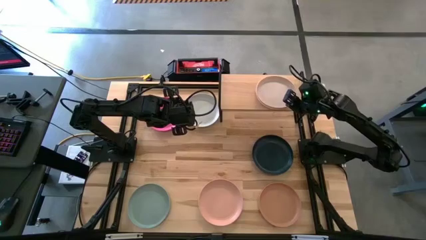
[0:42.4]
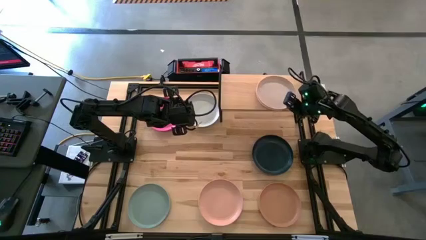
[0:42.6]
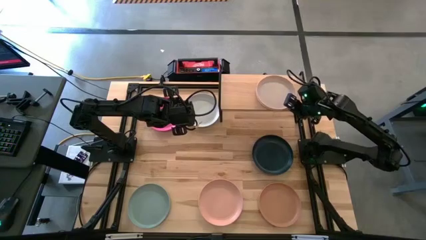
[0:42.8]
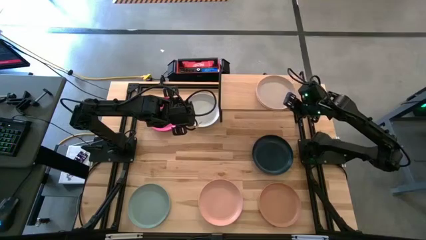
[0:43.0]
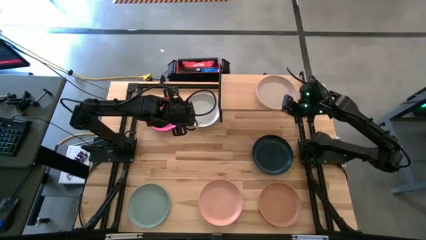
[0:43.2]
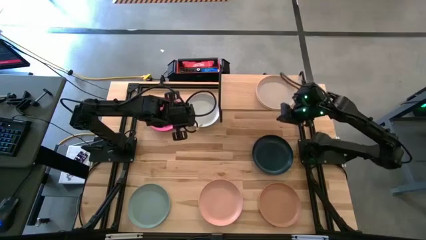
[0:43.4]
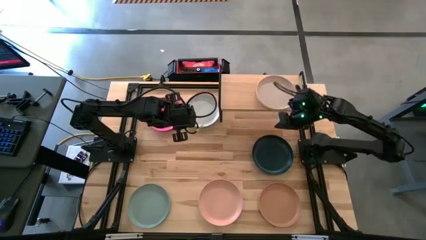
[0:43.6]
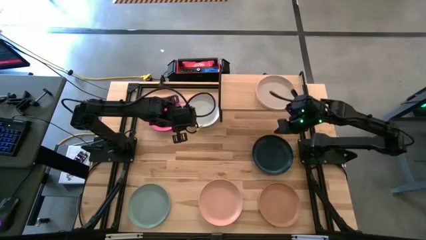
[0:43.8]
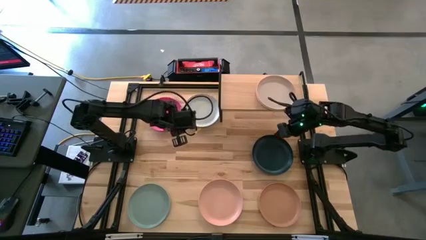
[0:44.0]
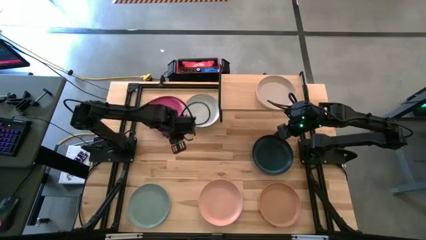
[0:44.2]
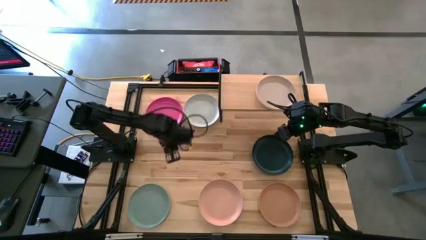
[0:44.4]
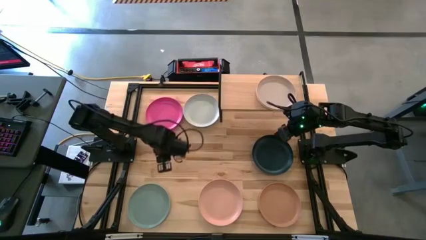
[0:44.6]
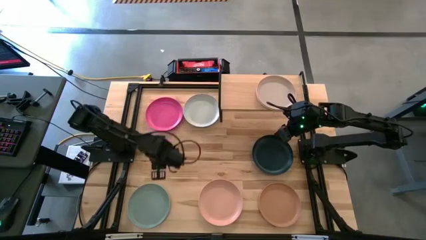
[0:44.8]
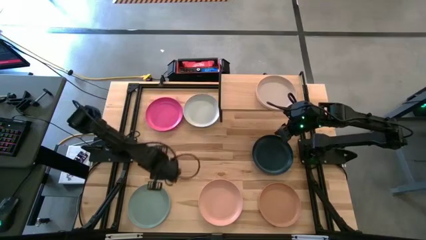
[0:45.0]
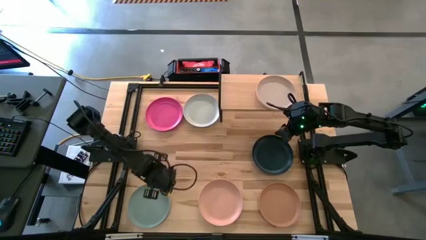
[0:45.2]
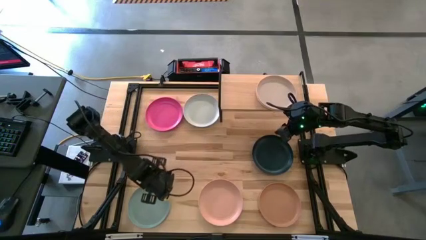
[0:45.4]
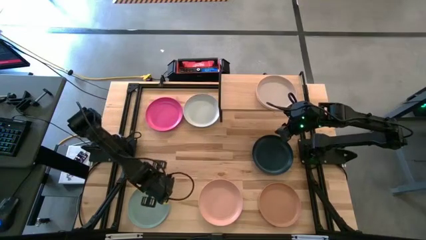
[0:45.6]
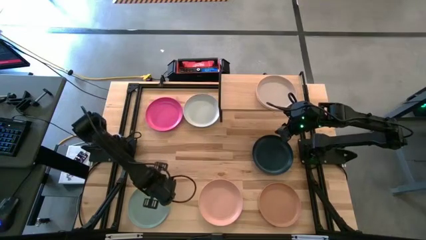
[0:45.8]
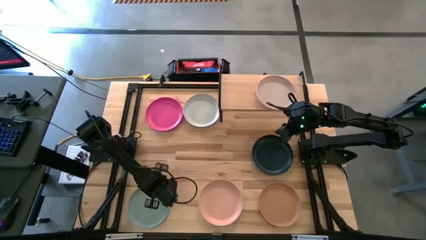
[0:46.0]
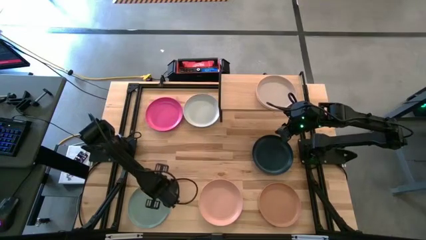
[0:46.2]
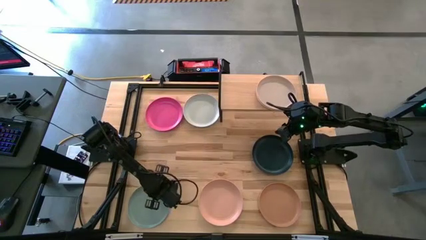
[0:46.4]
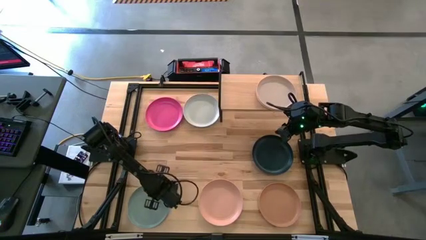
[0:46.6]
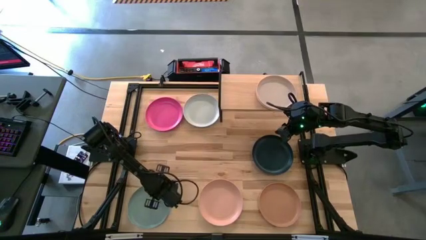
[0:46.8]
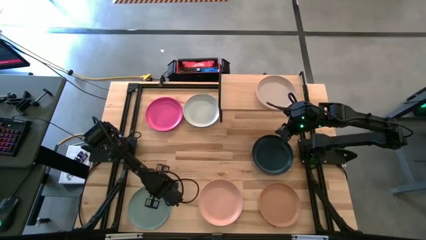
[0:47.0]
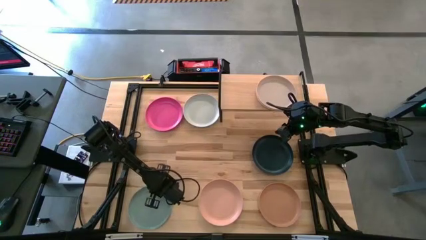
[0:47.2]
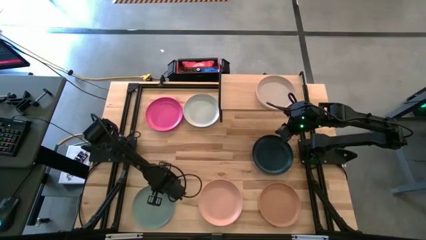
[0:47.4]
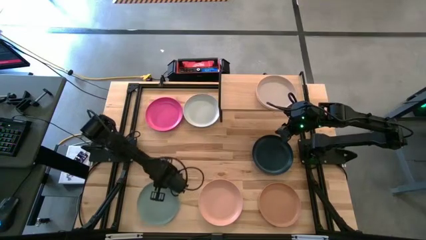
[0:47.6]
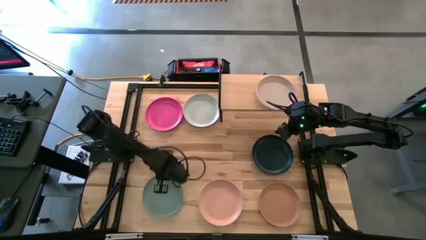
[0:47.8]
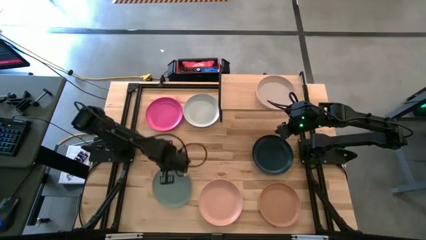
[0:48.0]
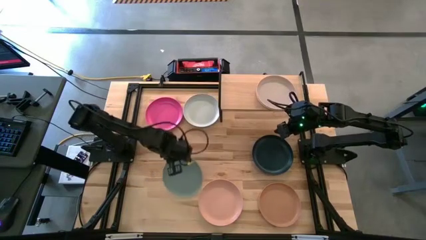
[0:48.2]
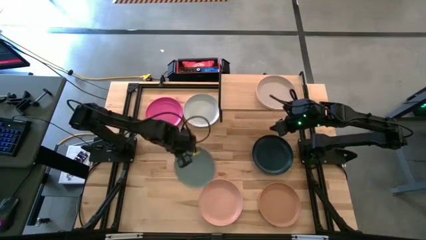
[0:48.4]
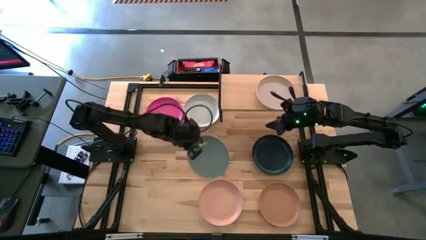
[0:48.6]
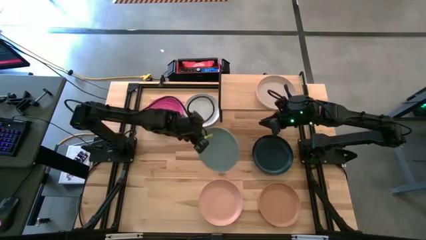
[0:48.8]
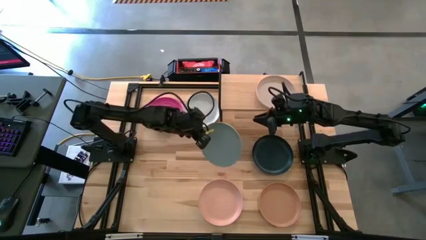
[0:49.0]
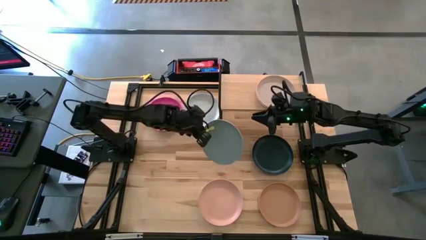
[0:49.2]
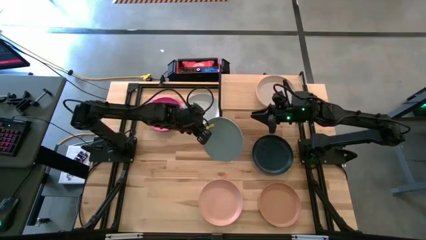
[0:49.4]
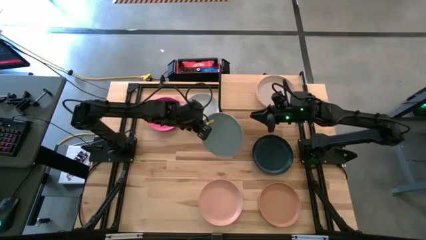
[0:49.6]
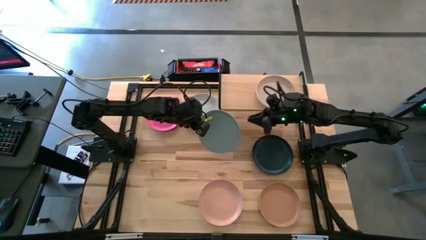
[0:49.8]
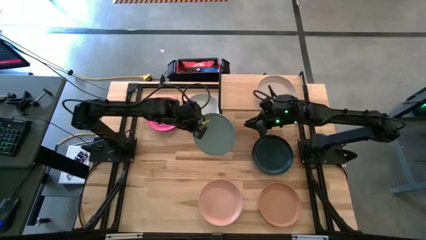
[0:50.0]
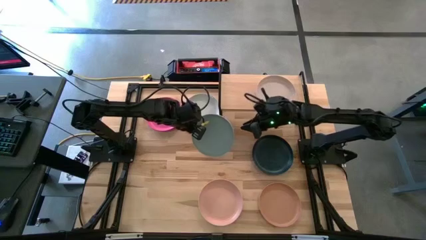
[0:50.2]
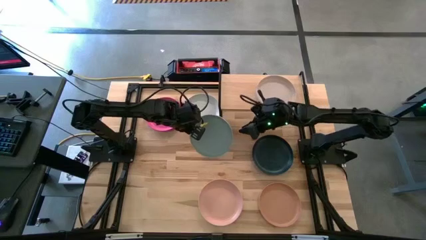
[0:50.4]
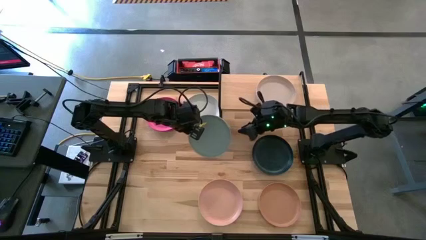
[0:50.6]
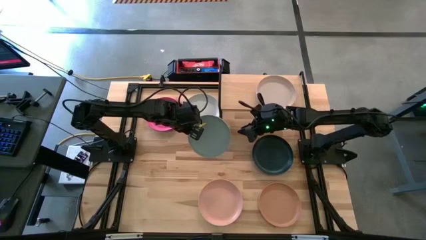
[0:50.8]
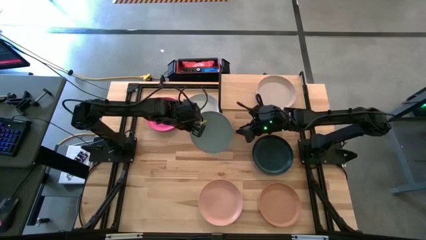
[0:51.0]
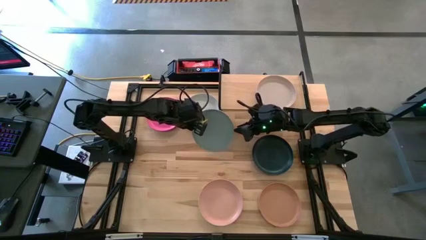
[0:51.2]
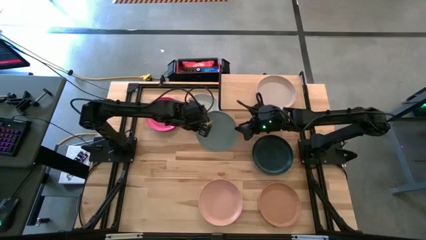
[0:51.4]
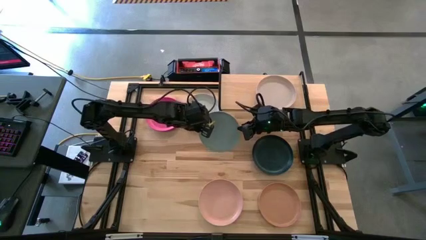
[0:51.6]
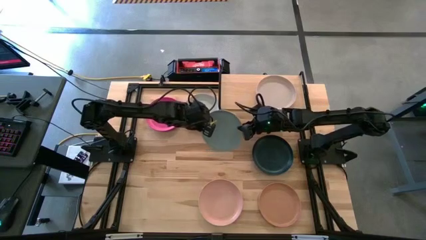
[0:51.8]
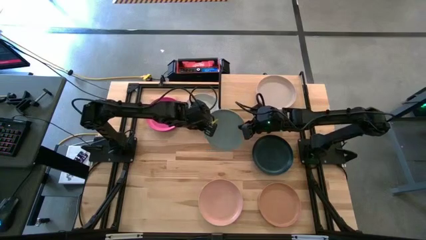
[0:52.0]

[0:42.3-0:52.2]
Task: Place and stack plates onto a shelf
Stack the gray plate on top of the white plate

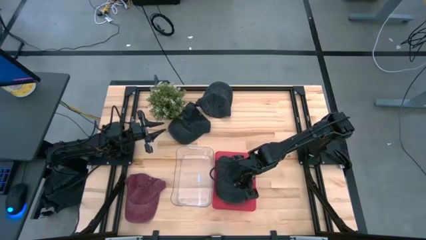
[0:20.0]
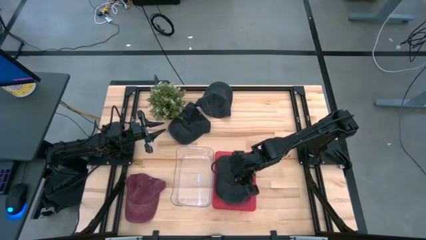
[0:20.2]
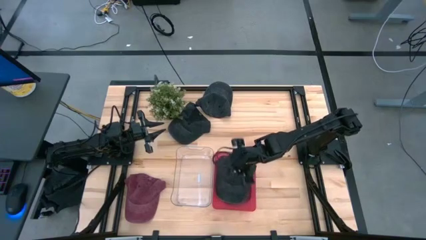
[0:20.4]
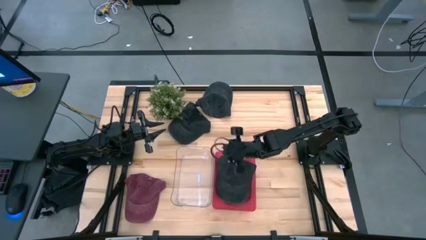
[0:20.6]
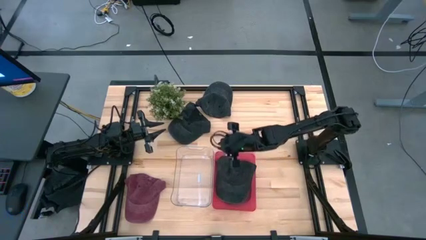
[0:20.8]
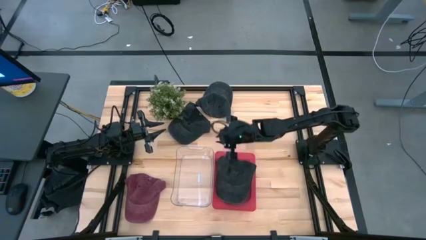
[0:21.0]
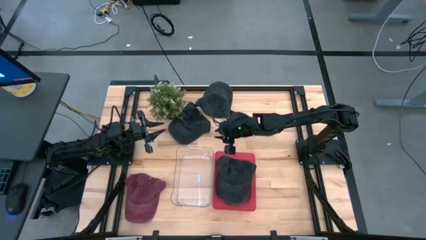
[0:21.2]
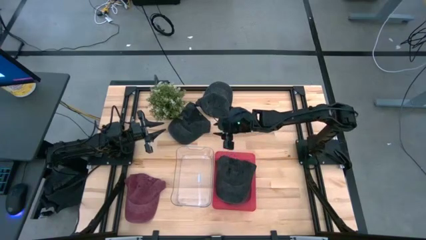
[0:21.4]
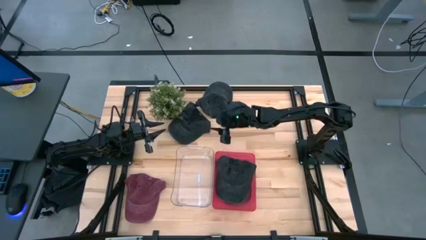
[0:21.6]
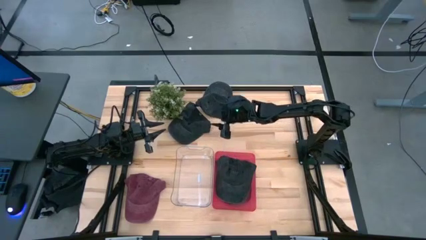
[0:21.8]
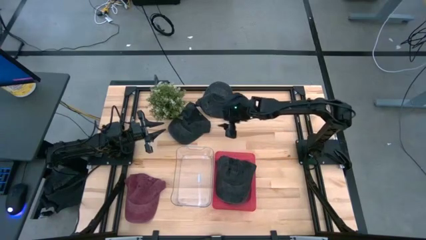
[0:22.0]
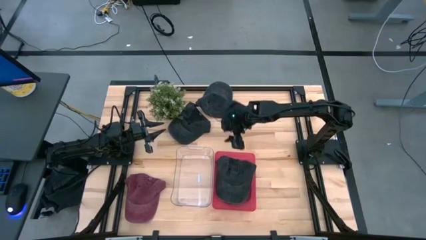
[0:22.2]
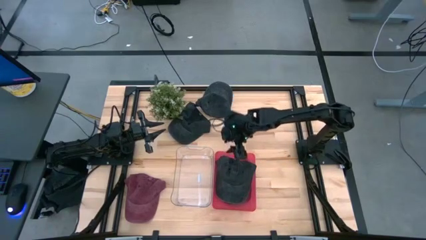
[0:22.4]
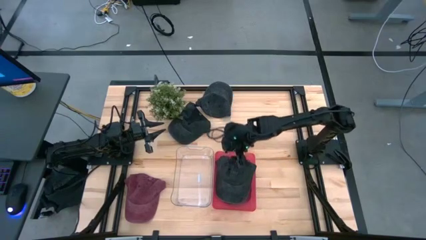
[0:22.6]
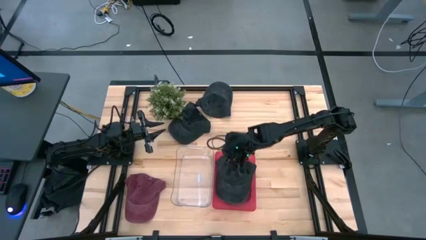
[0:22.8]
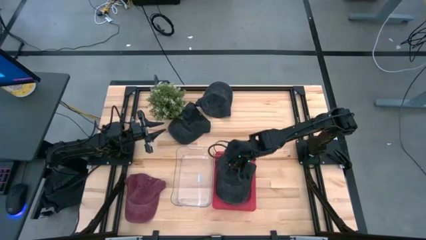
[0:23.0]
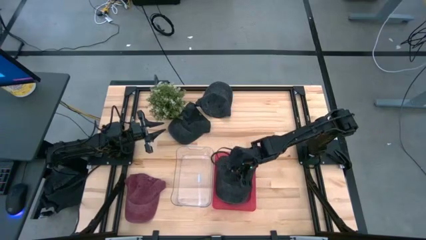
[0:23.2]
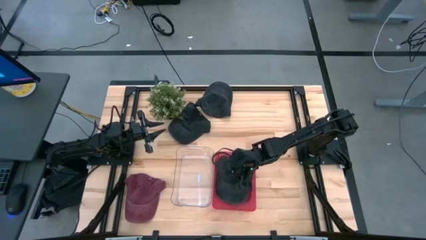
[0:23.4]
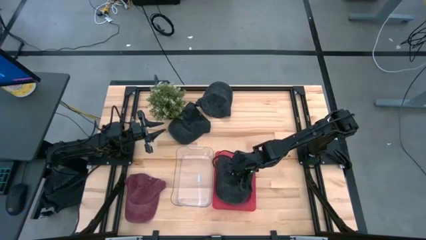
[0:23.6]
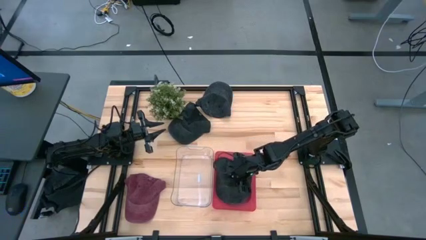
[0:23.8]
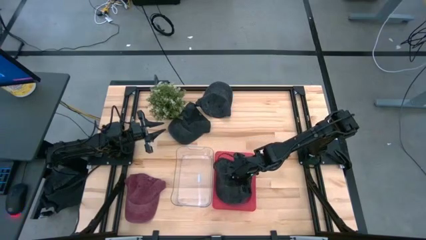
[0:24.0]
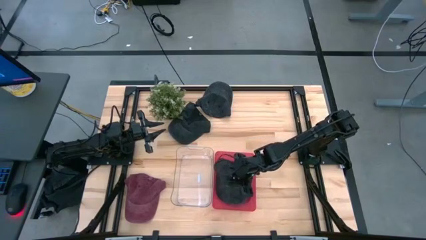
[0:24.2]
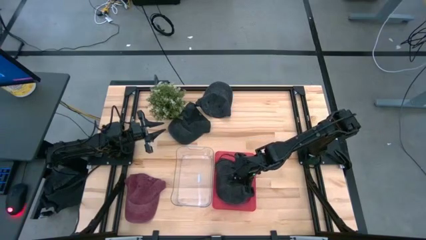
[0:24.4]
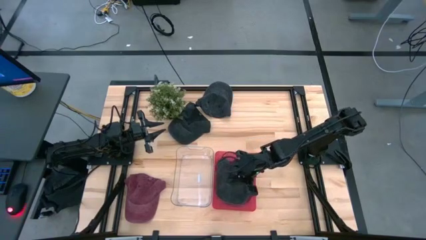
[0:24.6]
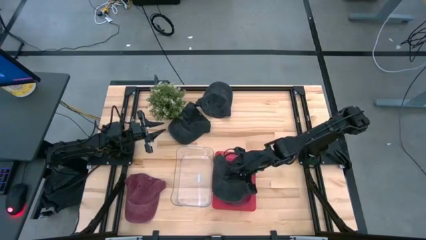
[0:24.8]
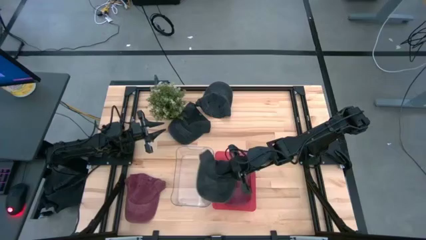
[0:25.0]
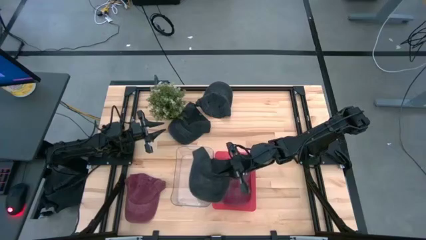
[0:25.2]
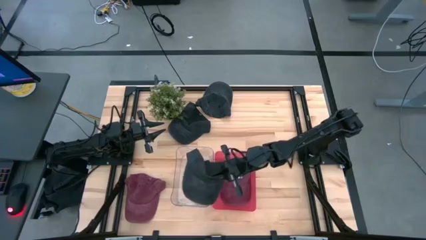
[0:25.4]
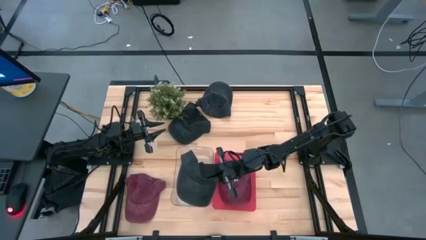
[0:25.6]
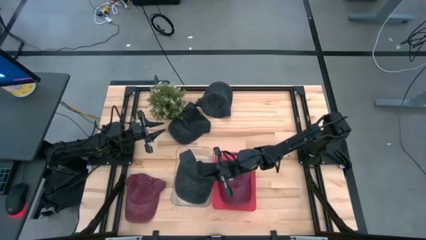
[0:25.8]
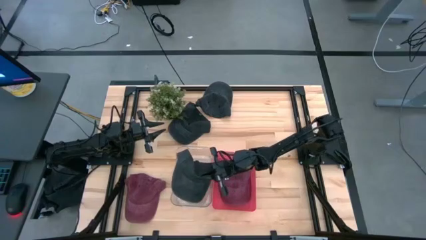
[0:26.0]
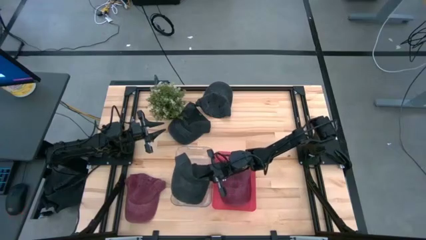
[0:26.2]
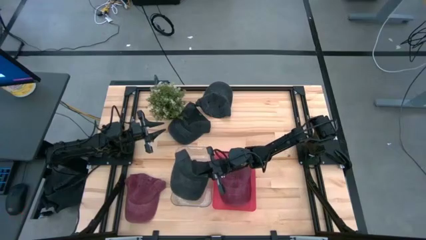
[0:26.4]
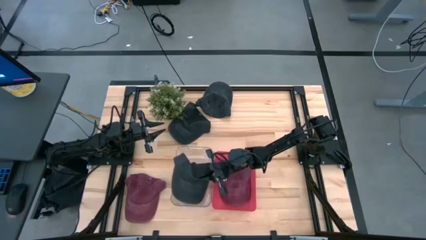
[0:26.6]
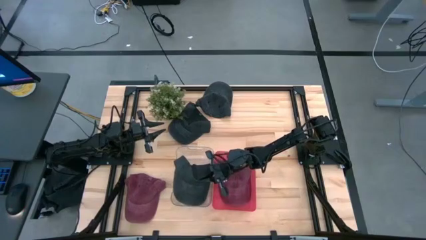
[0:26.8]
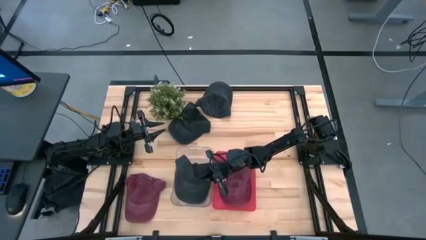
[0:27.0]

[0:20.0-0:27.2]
Task: Pick & Place hat
Put the top right black cap into the transparent bin
